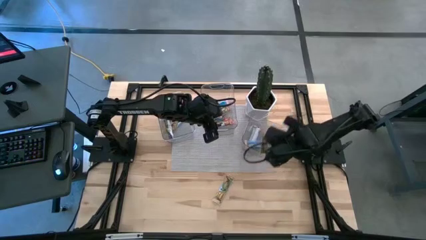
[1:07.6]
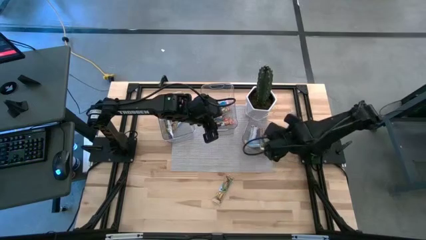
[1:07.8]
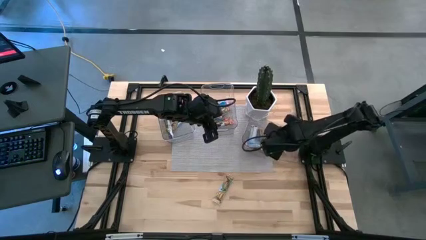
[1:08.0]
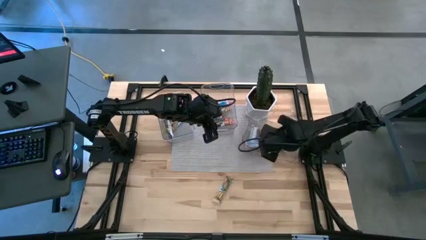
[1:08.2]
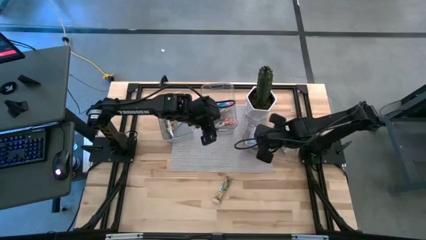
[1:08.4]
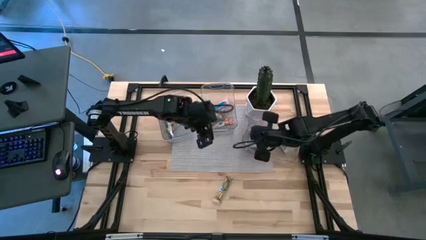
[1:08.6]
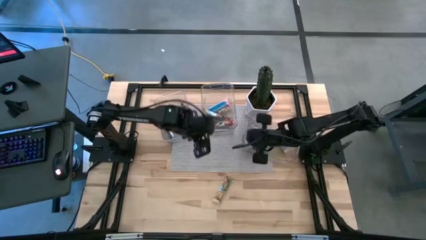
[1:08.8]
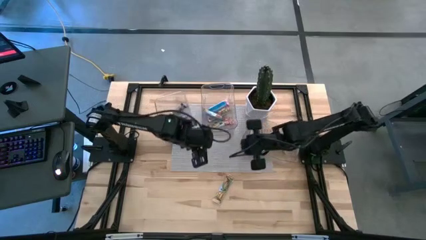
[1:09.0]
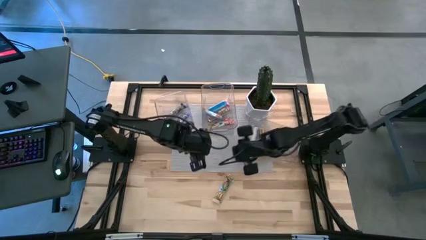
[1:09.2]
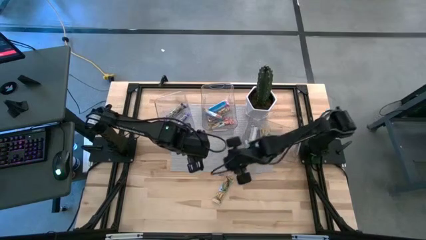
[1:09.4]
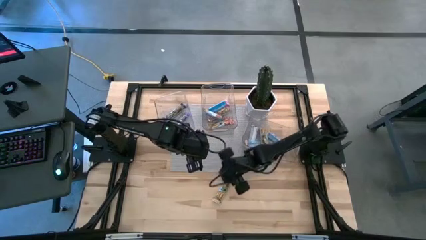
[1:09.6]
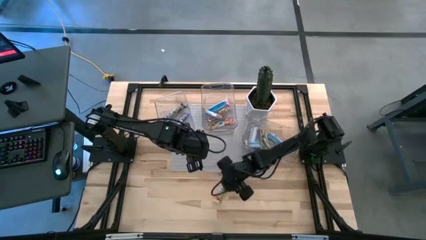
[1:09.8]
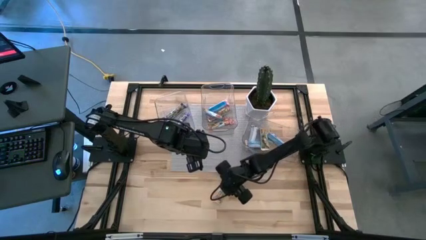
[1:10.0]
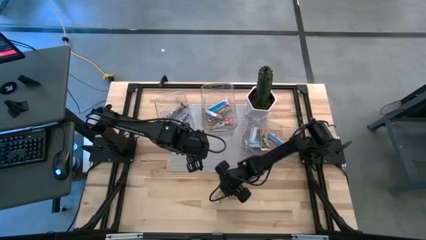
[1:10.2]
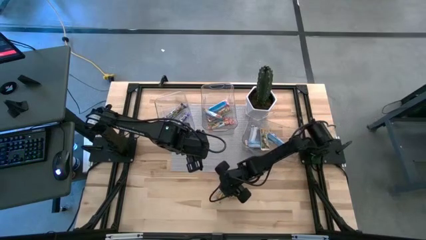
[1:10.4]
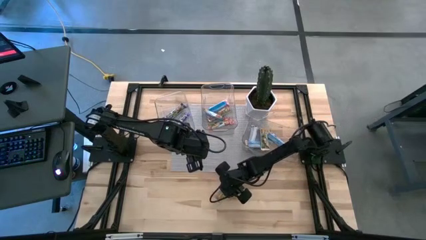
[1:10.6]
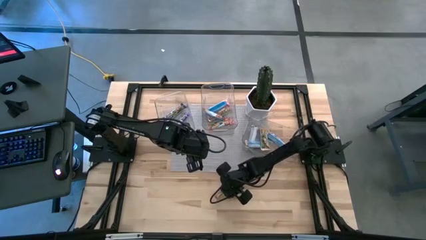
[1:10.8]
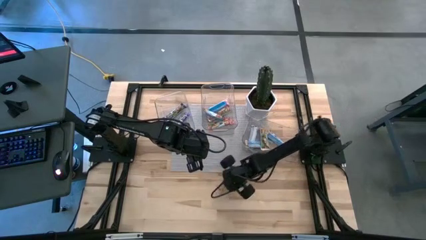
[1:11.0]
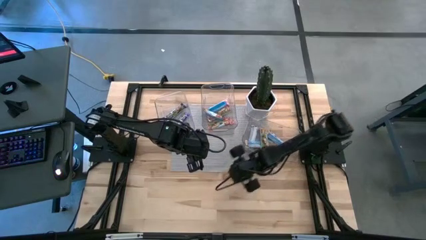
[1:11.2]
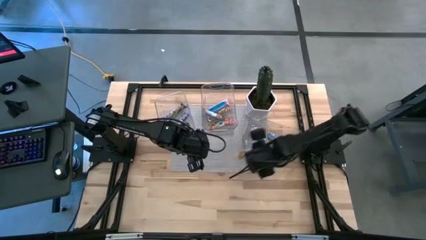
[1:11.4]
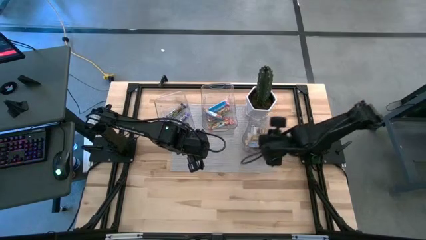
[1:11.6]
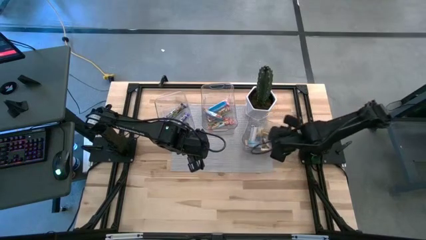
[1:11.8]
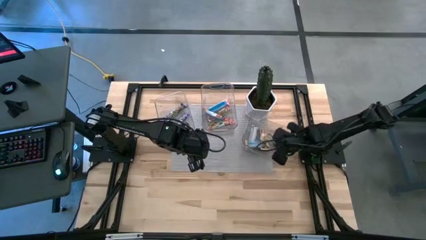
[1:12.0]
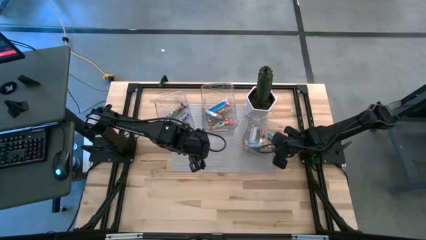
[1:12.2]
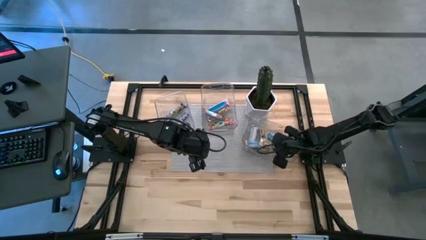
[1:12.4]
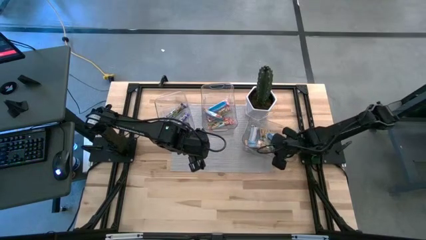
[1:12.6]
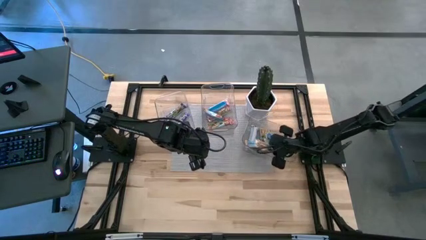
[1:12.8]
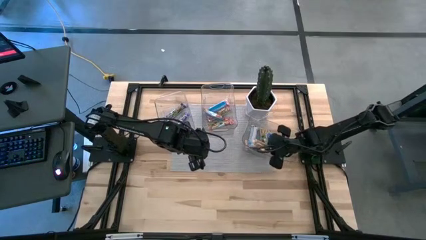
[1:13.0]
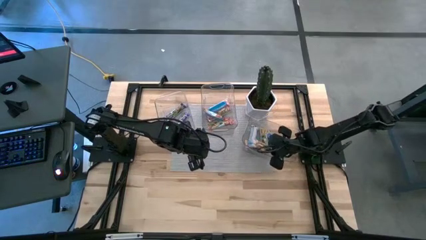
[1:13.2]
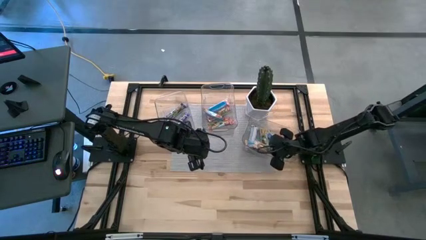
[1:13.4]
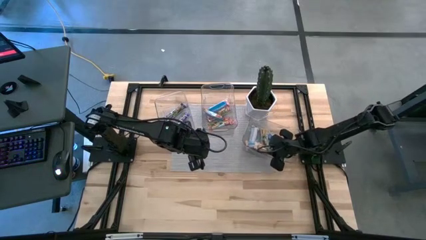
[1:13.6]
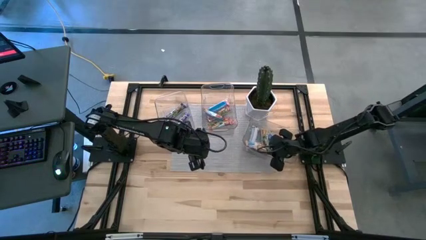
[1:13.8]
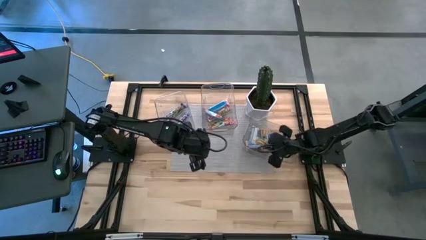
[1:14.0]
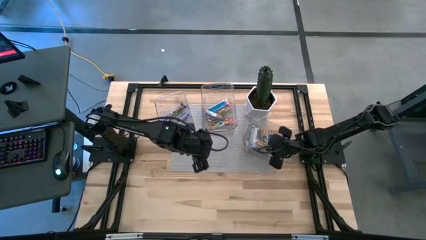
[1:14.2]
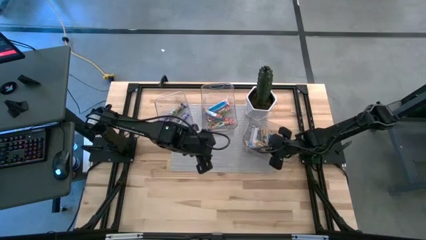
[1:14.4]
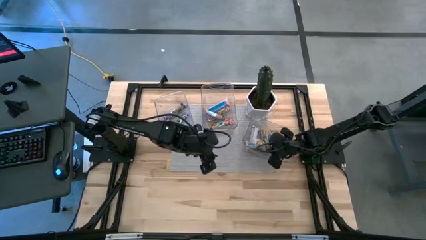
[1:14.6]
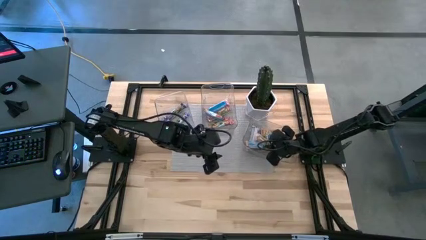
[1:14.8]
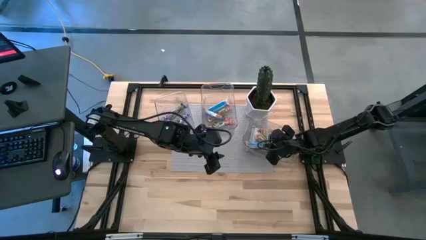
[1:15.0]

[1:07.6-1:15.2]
Task: Pick and place Granola Bars by type
Put the yellow granola bar into the right bin

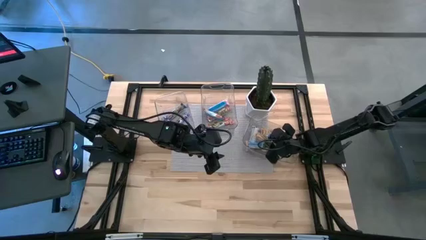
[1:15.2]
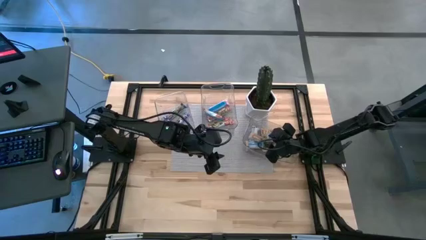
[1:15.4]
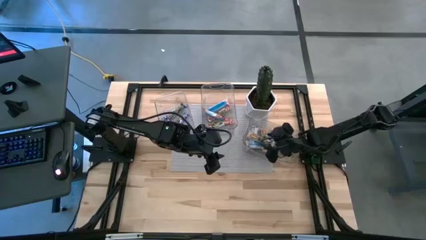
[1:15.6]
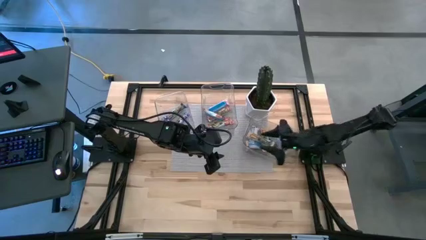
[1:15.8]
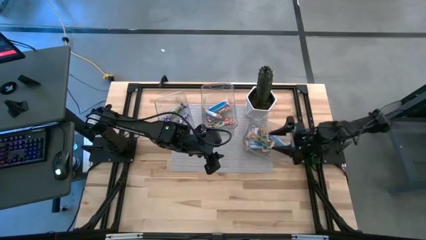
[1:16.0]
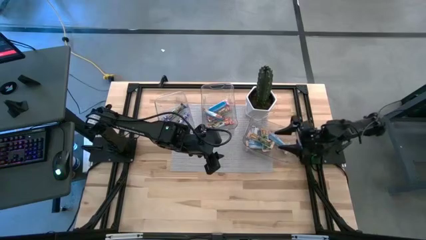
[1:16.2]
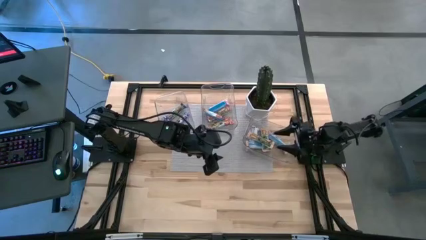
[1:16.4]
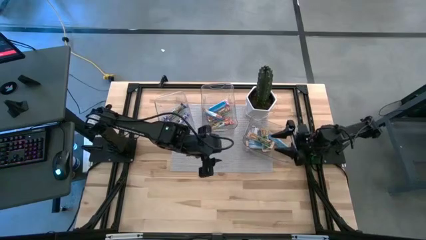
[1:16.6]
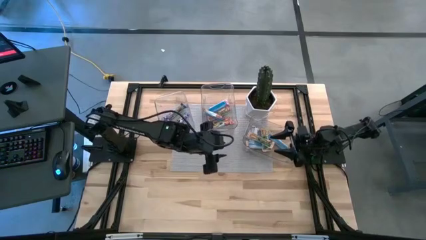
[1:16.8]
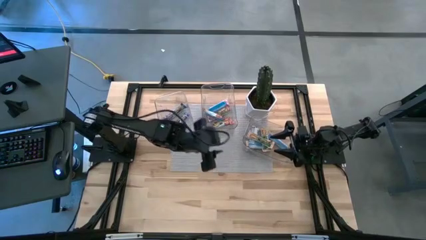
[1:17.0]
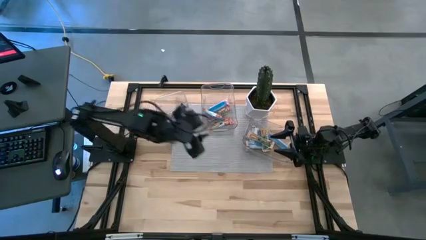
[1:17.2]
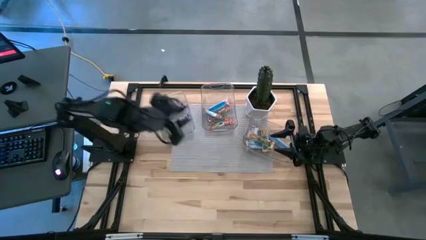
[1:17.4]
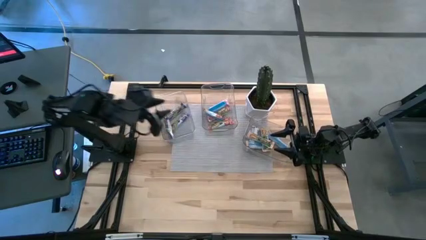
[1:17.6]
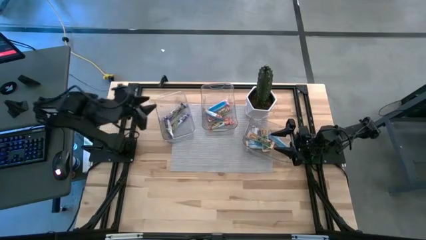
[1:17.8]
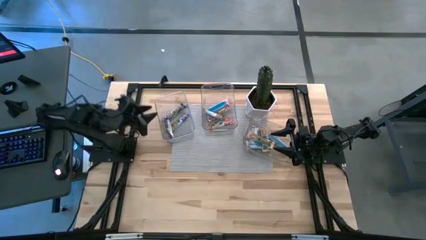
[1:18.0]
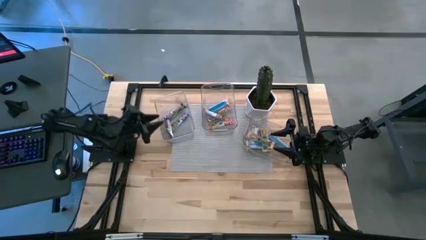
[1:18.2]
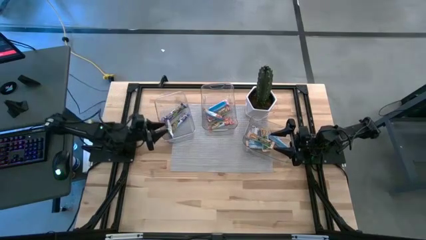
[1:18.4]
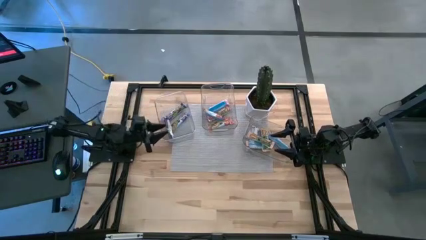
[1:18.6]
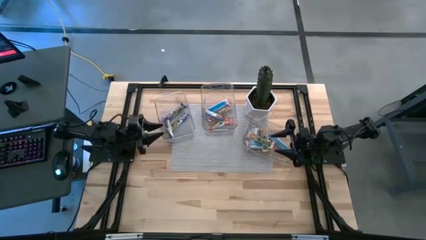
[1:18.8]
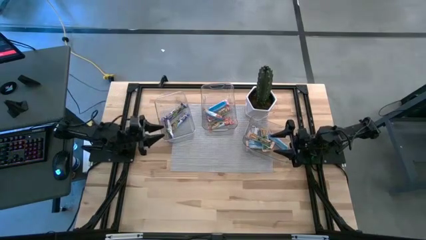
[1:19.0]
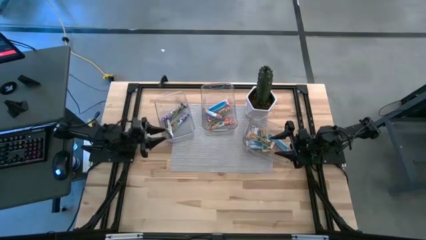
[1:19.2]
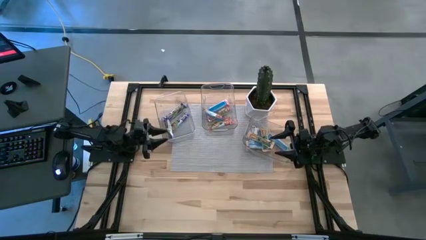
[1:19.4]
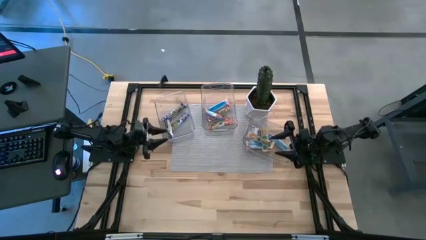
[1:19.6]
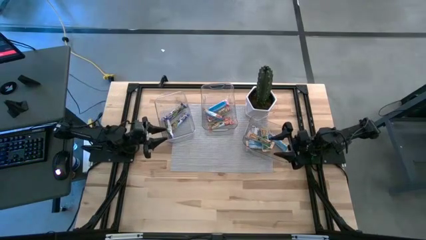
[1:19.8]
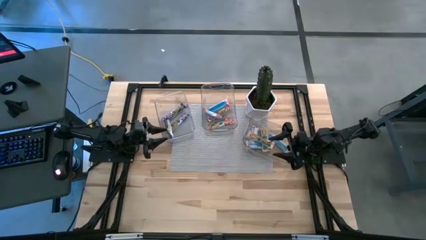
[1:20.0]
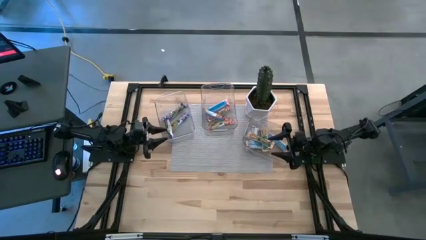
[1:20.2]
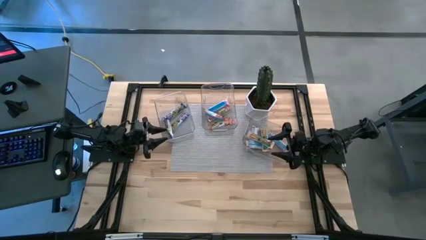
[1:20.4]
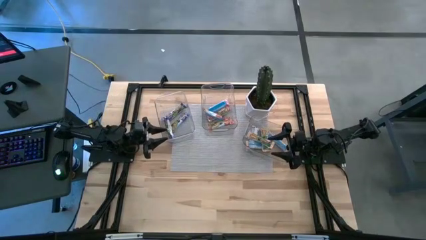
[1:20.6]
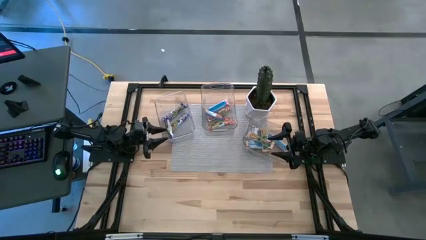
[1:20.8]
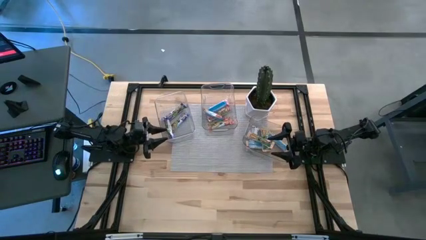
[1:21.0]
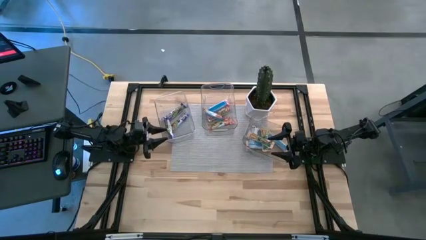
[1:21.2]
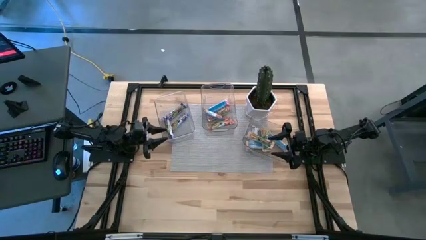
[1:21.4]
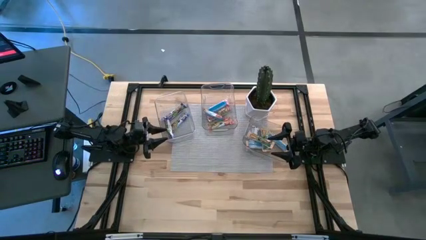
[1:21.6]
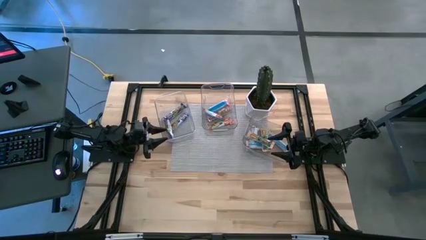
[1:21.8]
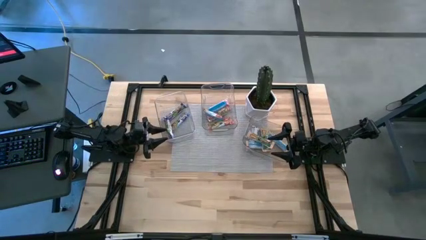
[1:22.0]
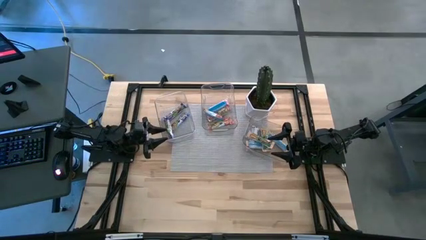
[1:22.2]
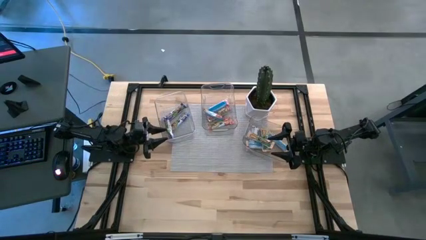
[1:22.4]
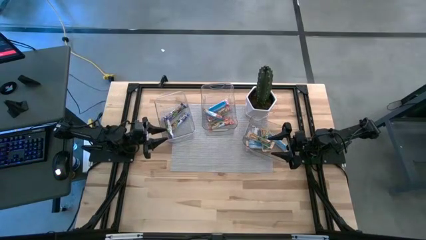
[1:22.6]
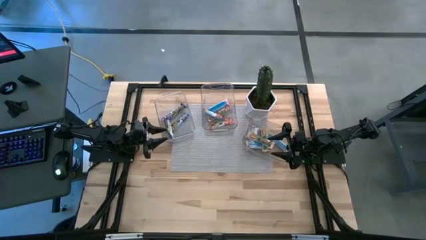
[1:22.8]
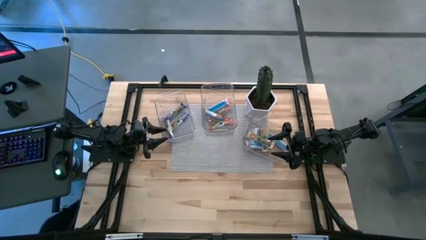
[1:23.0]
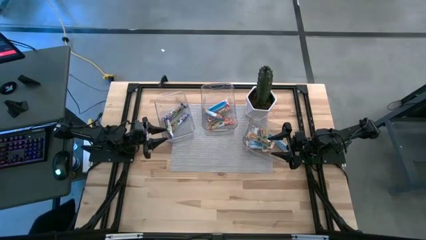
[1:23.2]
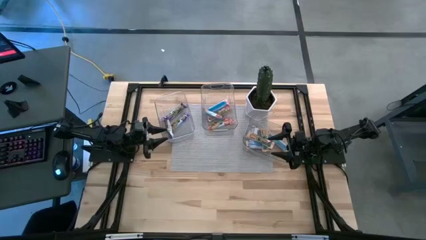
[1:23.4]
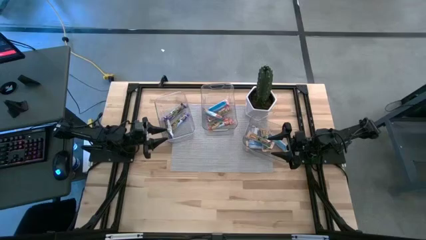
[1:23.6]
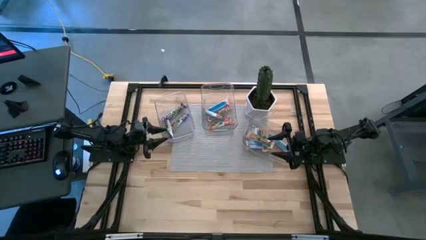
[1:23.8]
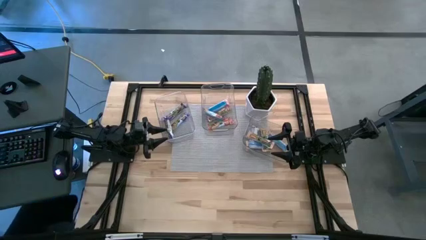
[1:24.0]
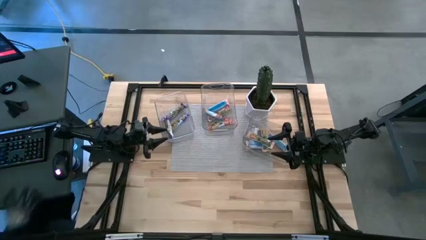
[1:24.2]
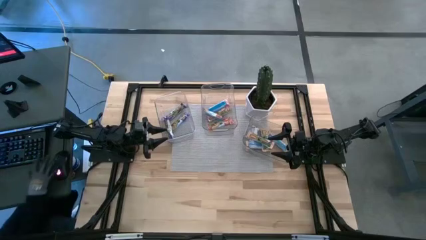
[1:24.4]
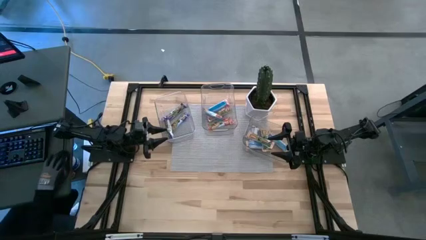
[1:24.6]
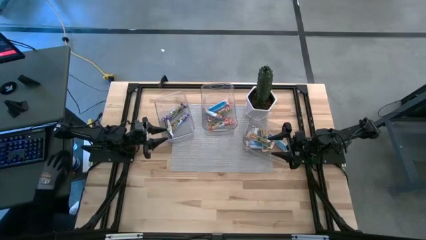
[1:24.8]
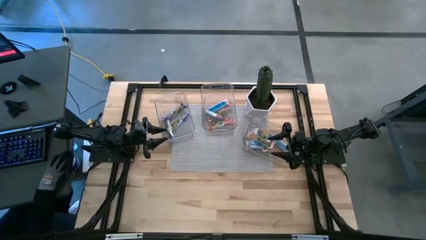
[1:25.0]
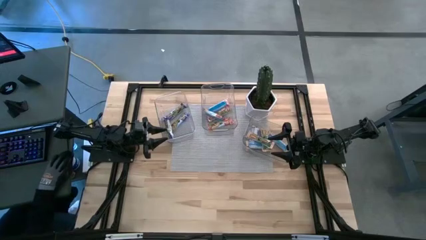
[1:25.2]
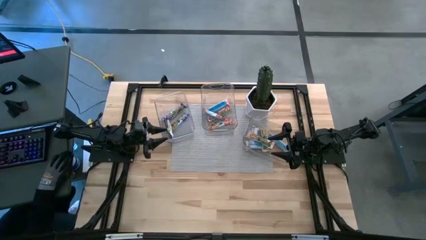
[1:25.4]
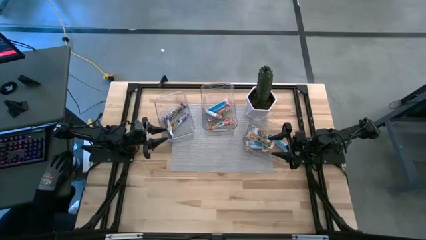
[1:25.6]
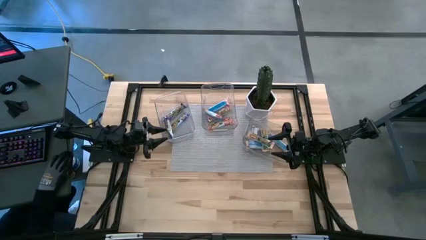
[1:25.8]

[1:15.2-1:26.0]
Return to Home Position
